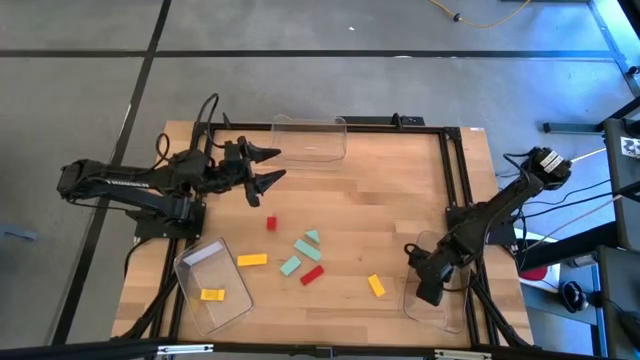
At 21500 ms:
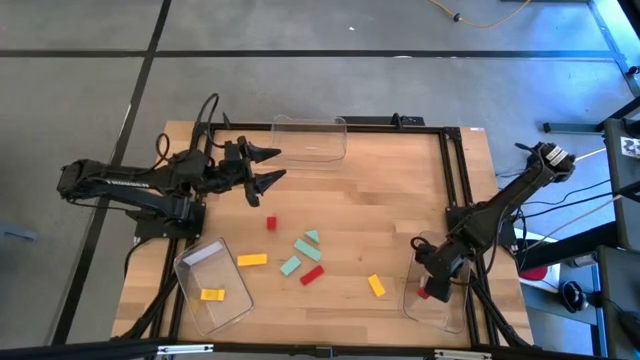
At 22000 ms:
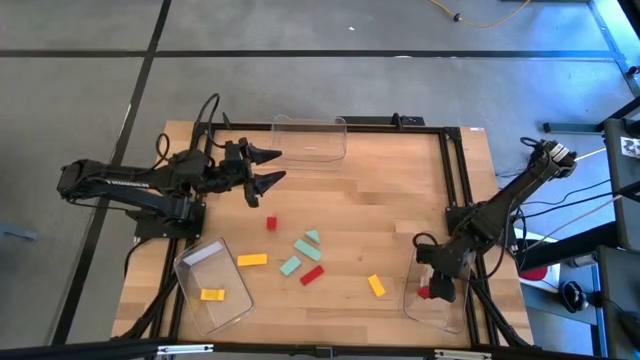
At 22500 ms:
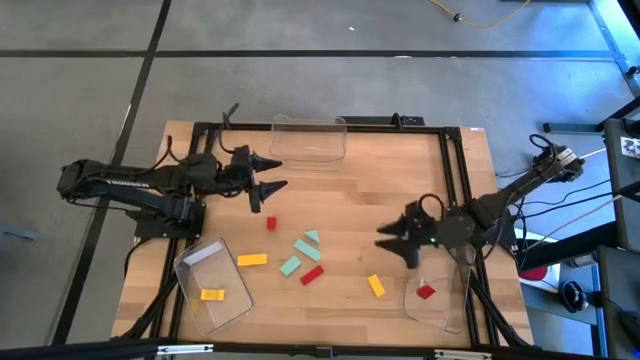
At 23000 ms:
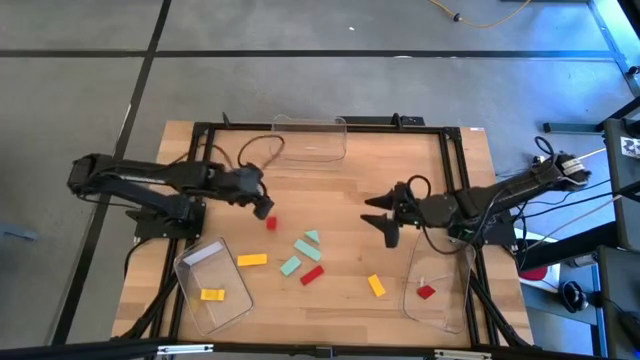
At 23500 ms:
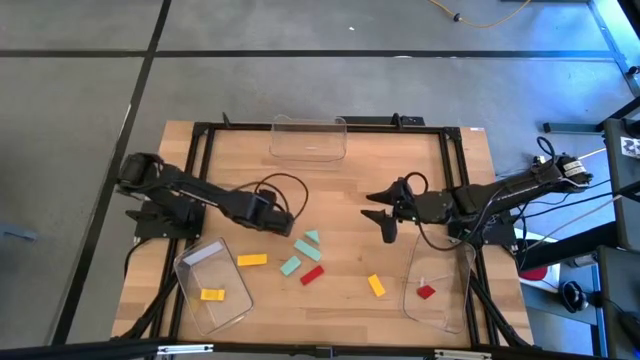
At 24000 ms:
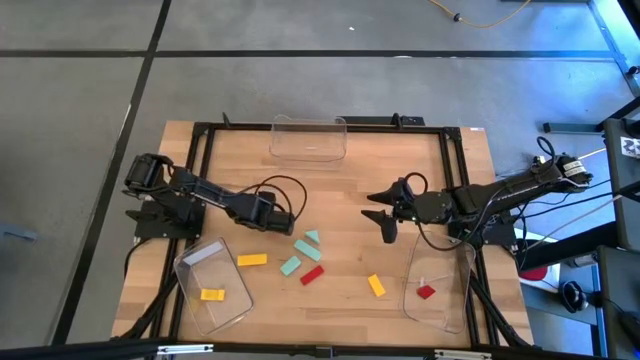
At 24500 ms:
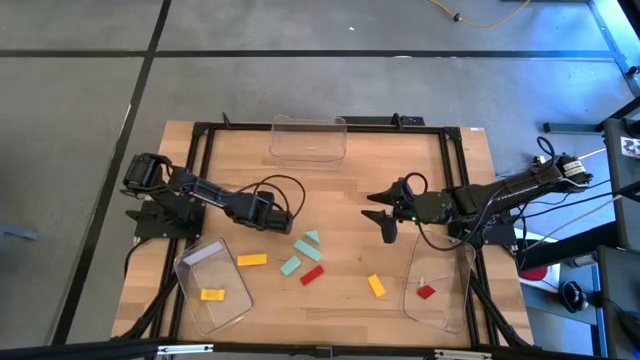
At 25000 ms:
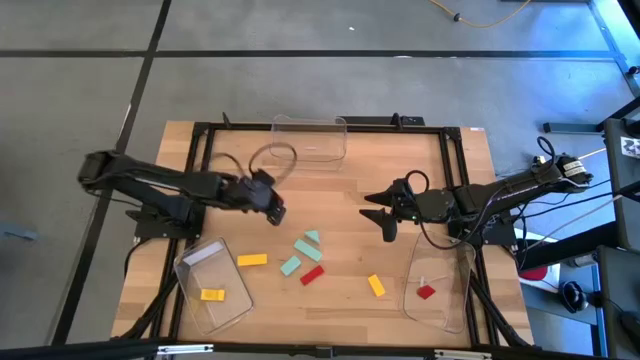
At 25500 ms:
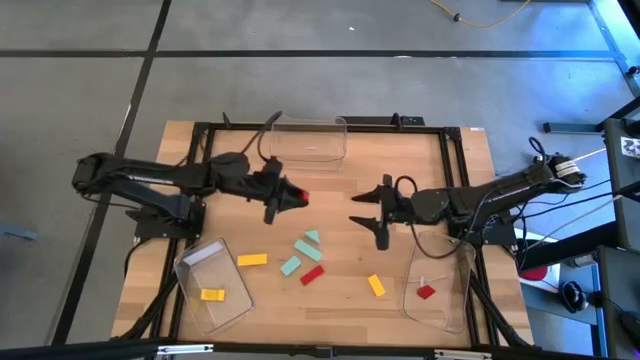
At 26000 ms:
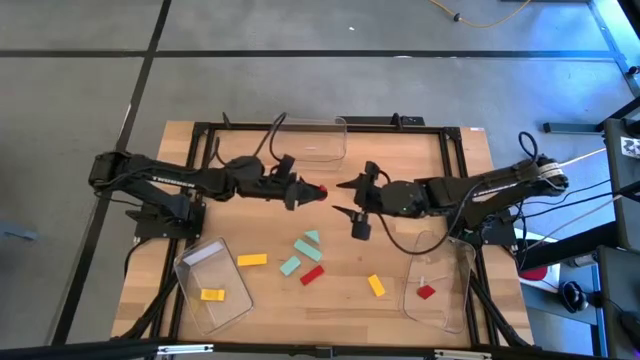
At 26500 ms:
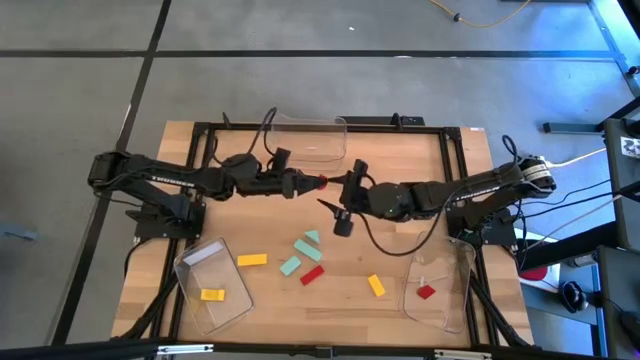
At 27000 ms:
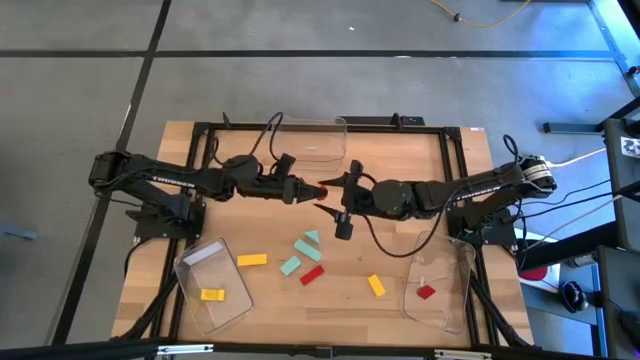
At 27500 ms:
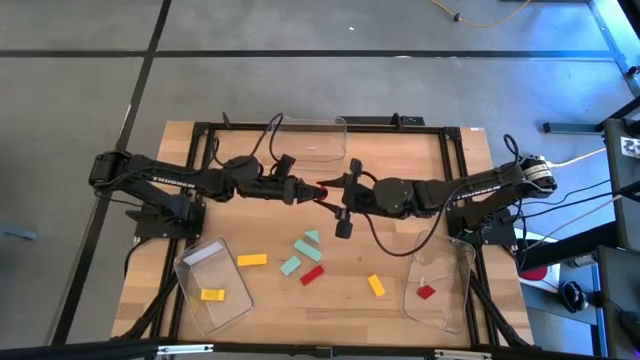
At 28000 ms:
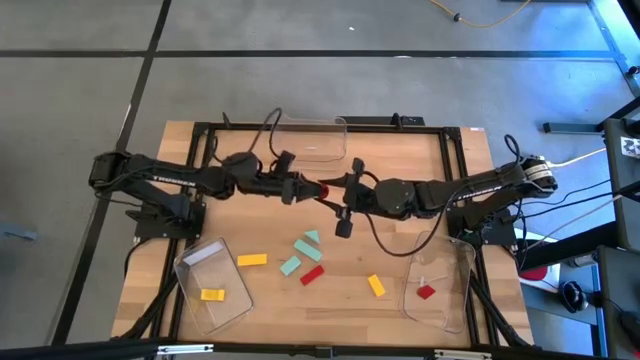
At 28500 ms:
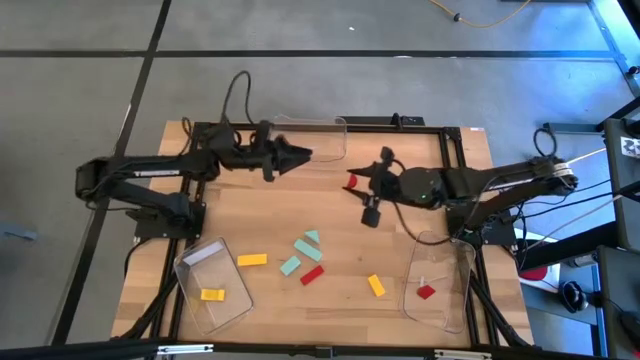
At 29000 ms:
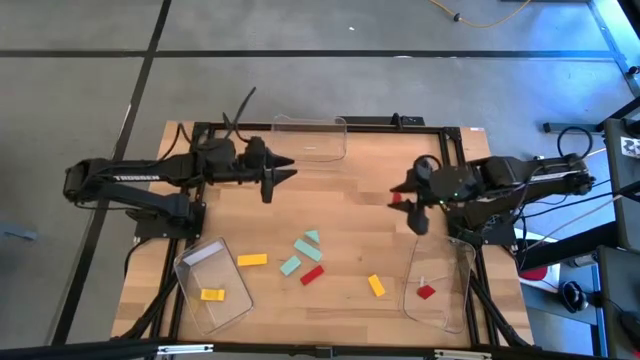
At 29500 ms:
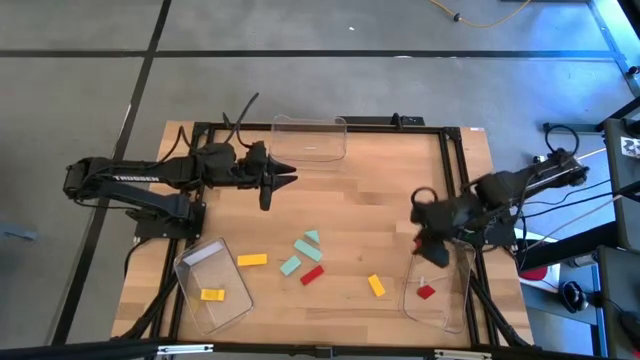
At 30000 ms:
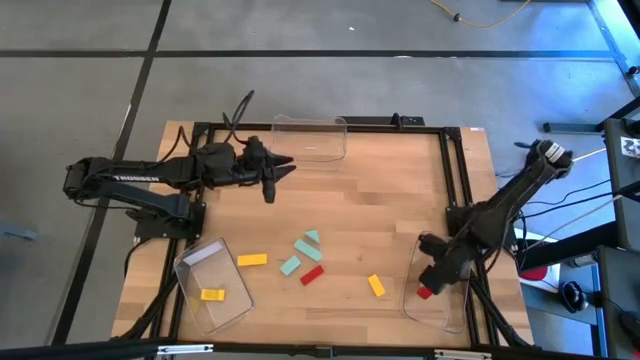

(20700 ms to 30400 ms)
Task: Sort & place blocks by color
Put the top red block into the right transparent bin

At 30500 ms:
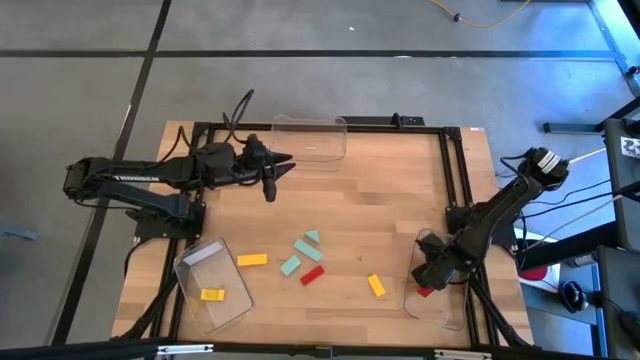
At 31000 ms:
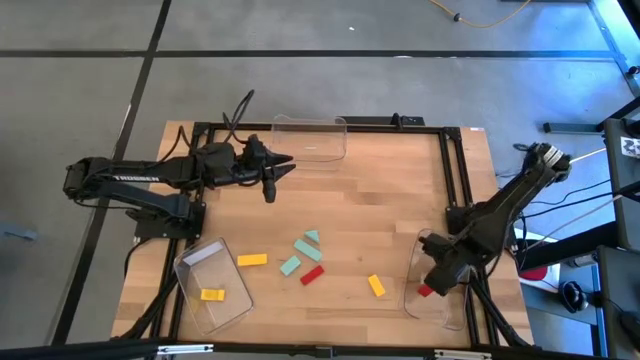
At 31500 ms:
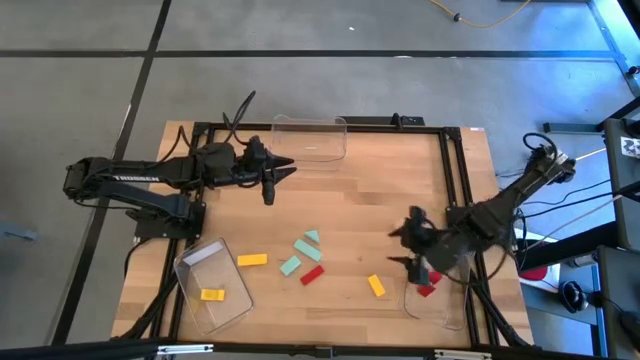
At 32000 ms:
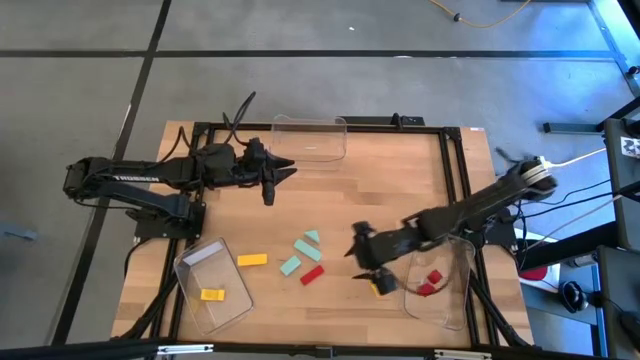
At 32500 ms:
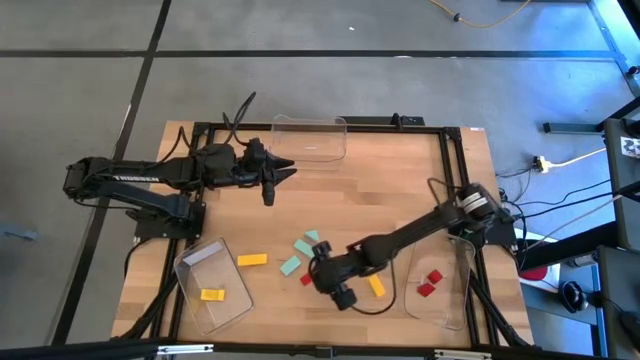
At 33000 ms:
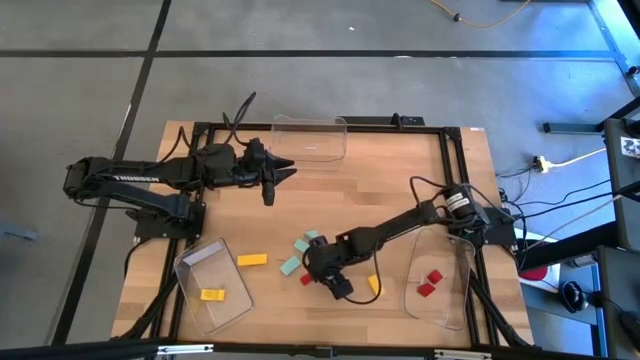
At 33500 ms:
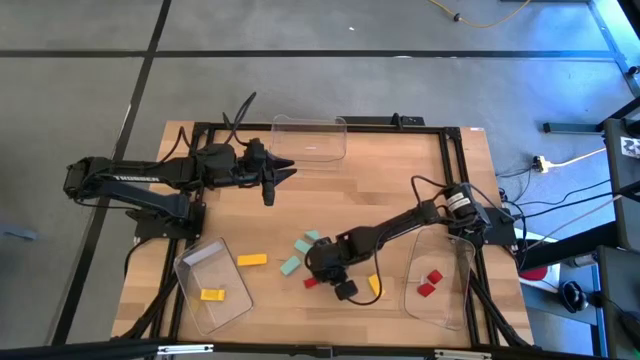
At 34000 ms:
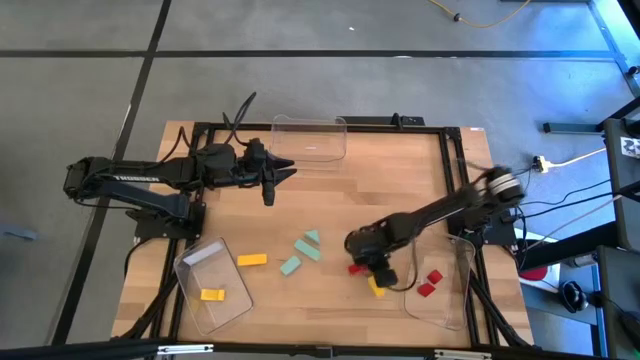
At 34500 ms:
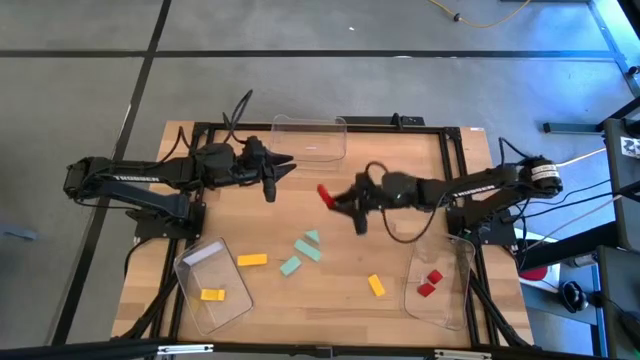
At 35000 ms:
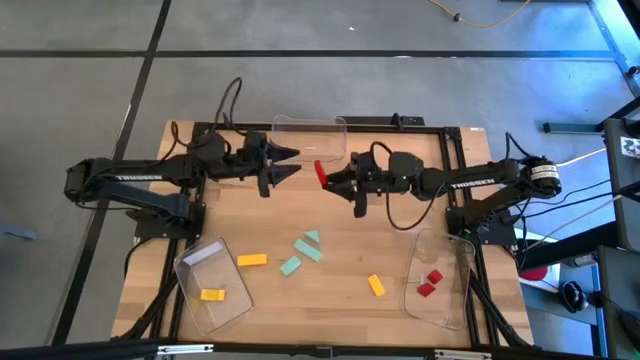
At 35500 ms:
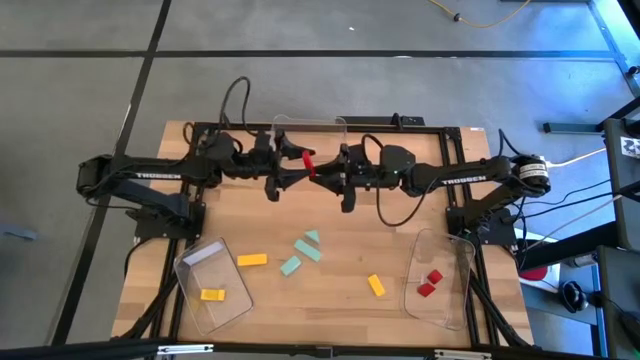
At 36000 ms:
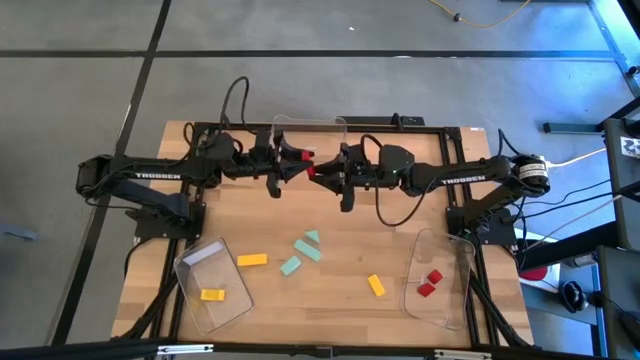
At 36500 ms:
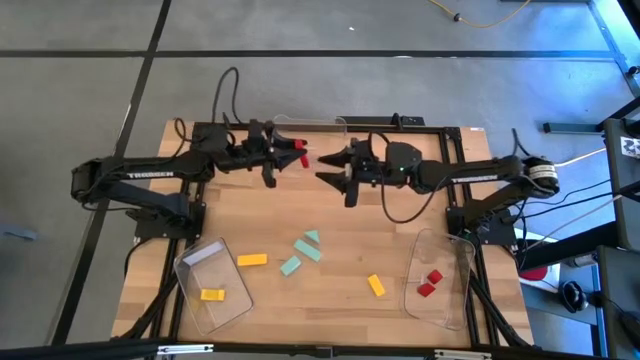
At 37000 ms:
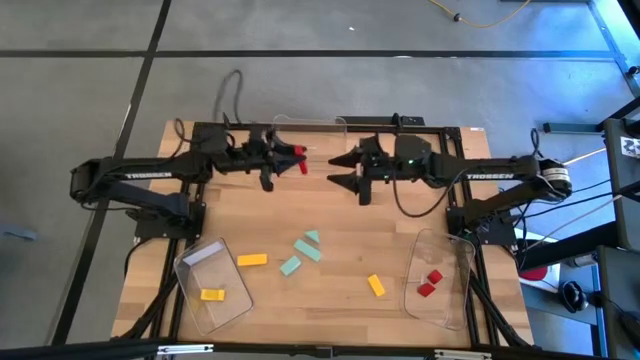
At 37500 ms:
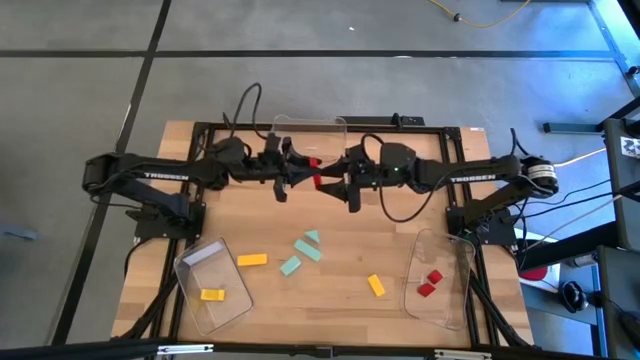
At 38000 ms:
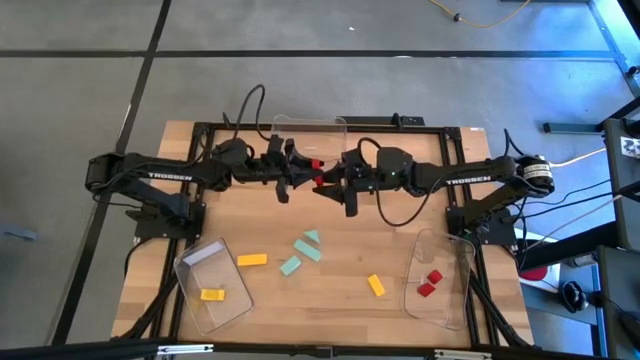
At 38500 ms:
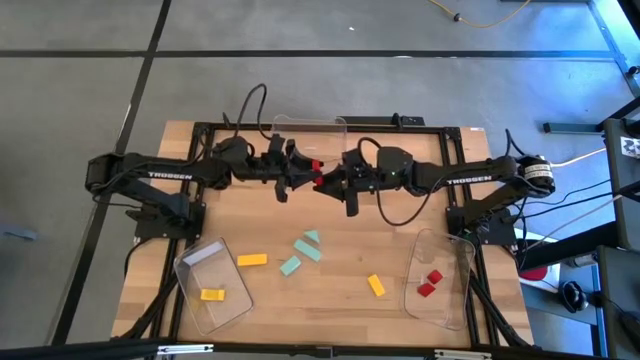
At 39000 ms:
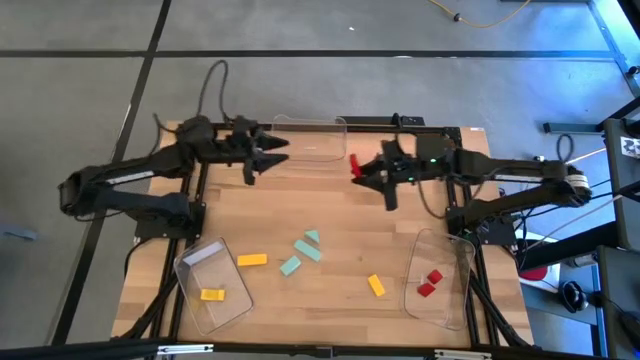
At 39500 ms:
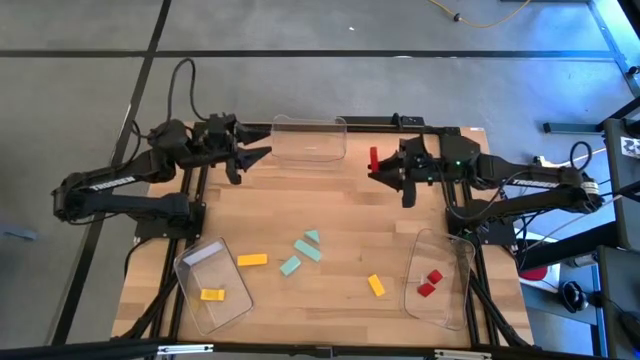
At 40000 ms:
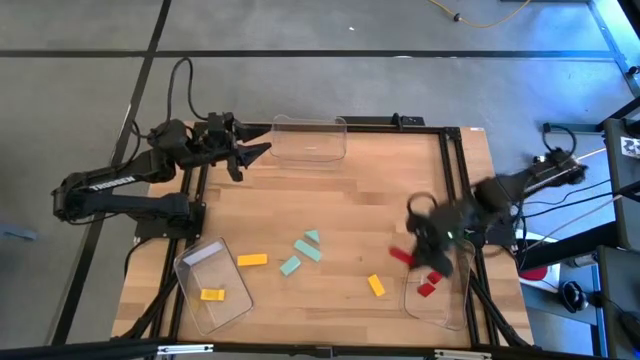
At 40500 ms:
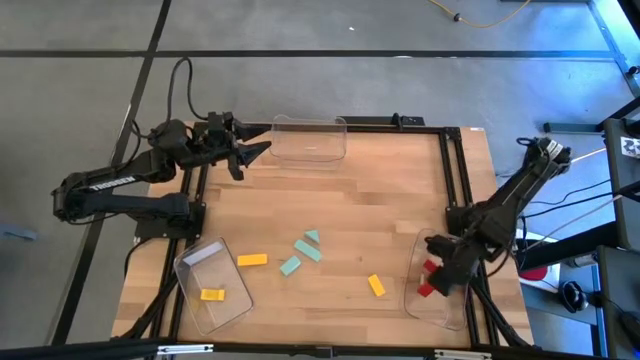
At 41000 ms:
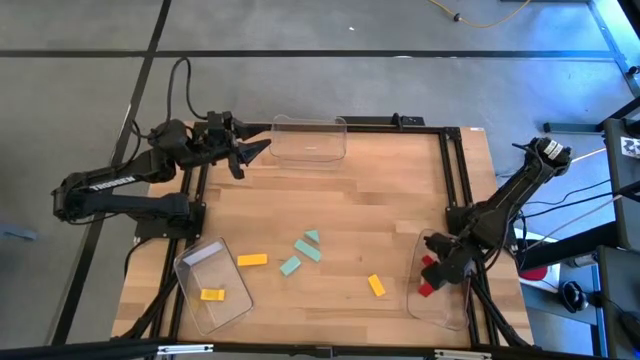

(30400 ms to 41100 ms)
Put the red block into the right transparent bin

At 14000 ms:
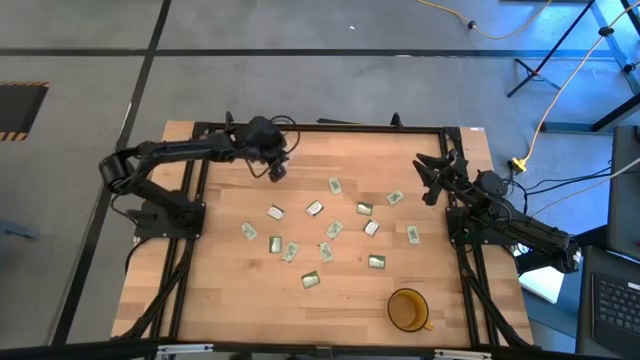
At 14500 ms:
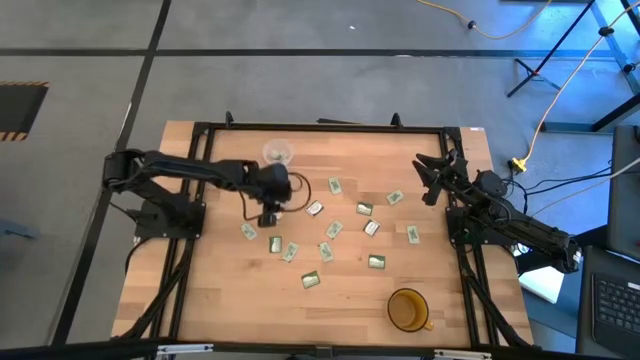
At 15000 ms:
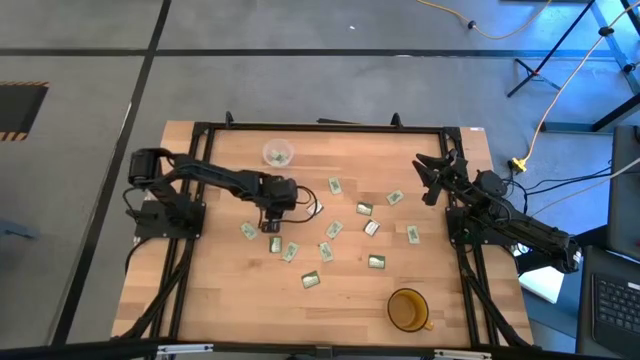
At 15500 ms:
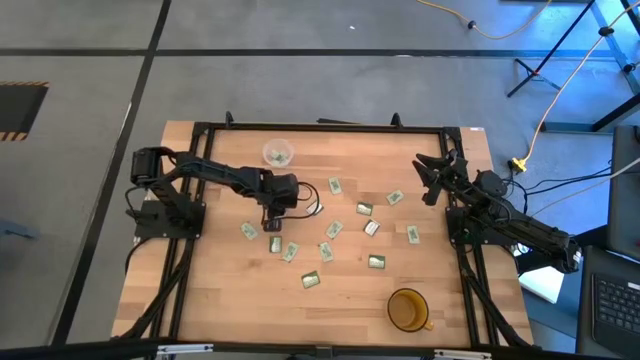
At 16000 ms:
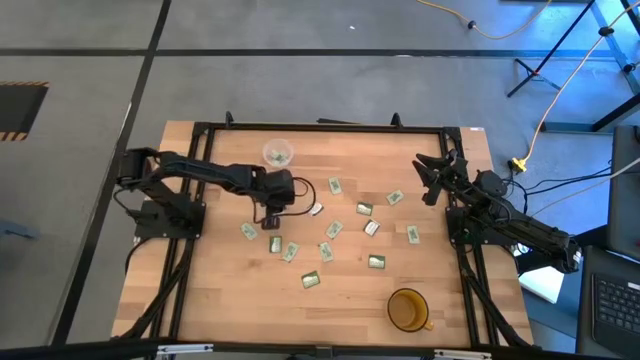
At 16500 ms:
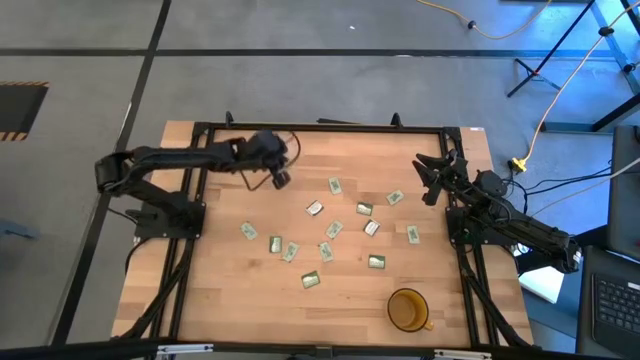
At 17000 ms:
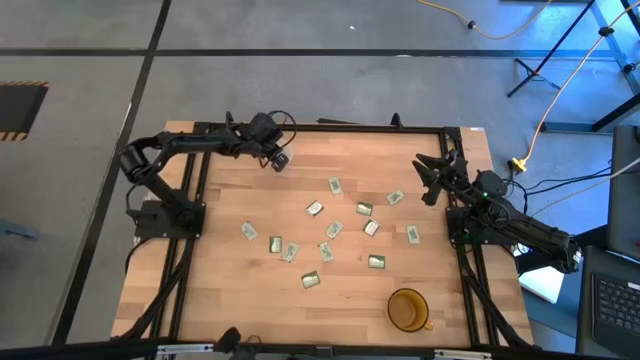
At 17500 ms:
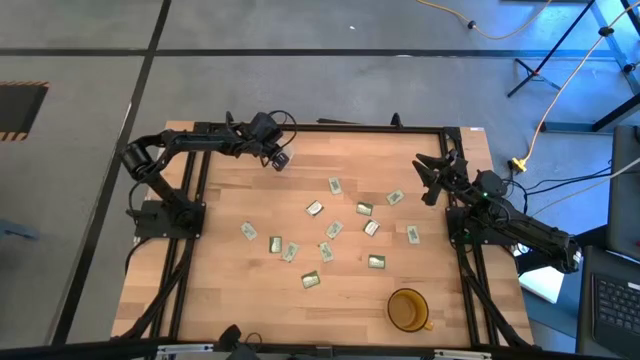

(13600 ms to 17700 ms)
Task: Pick and place Stevia / Truvia into bins
Put the truvia packet into the transparent container
